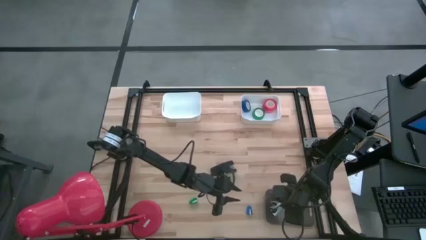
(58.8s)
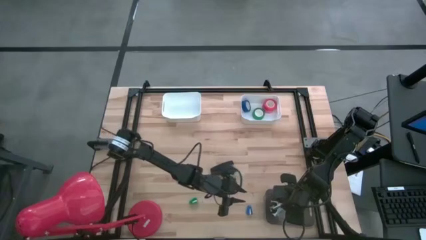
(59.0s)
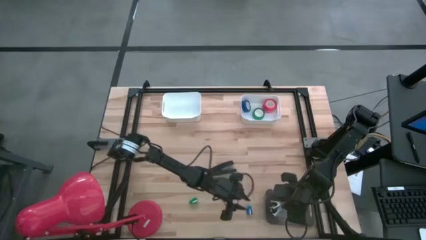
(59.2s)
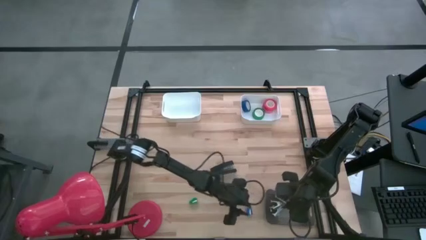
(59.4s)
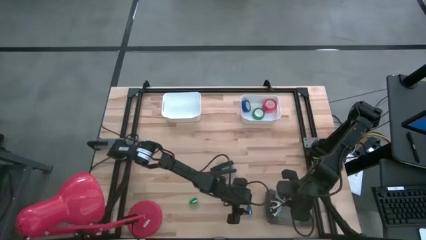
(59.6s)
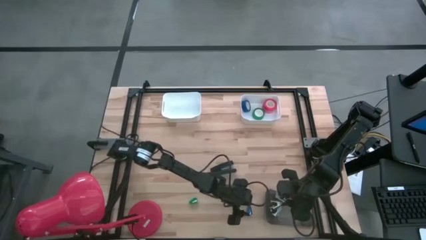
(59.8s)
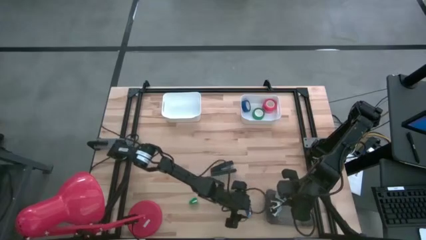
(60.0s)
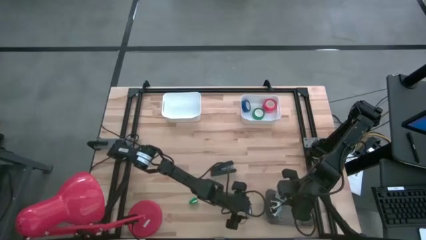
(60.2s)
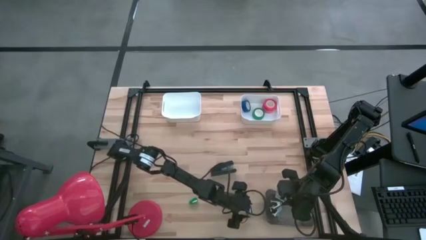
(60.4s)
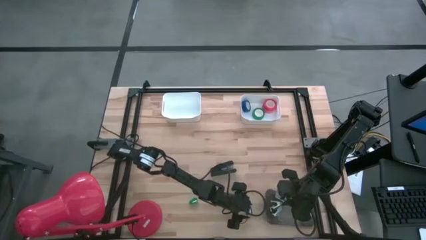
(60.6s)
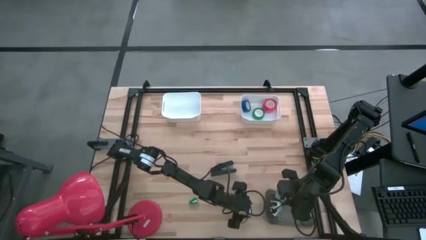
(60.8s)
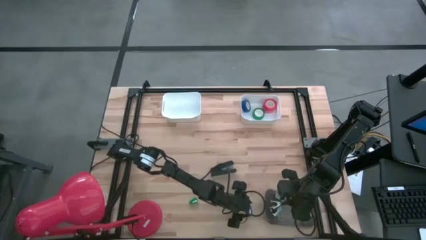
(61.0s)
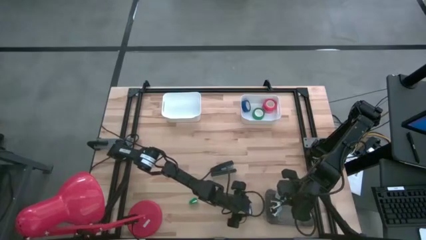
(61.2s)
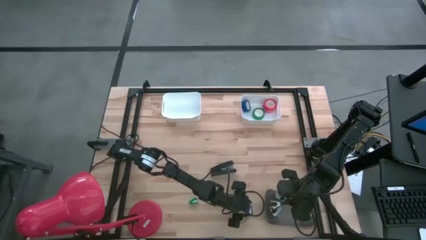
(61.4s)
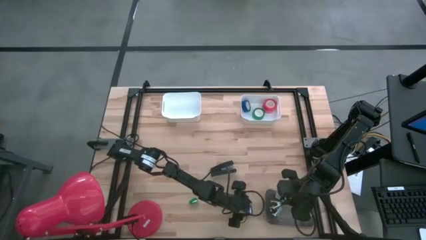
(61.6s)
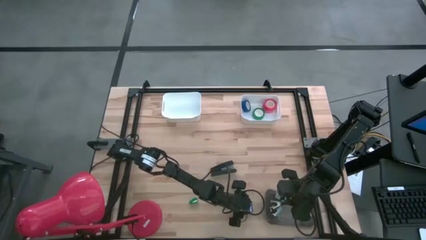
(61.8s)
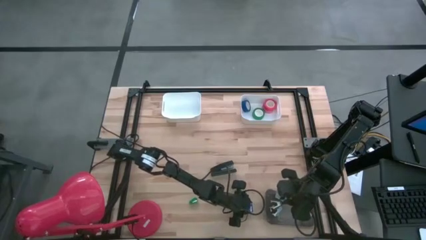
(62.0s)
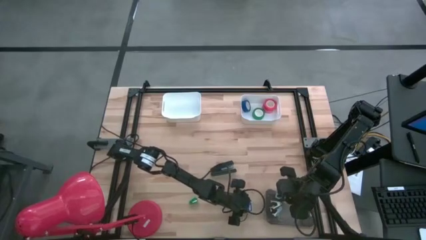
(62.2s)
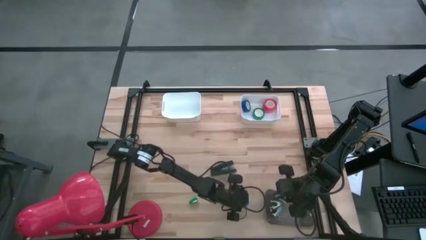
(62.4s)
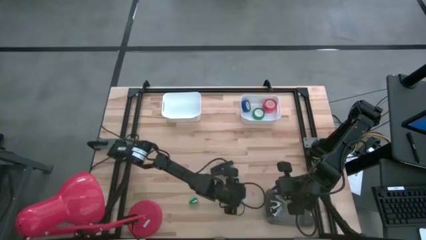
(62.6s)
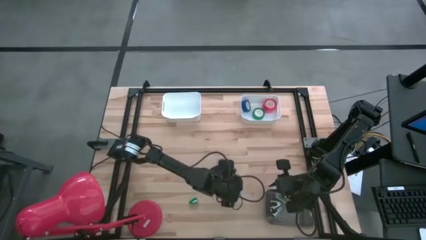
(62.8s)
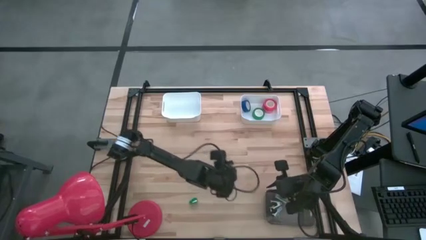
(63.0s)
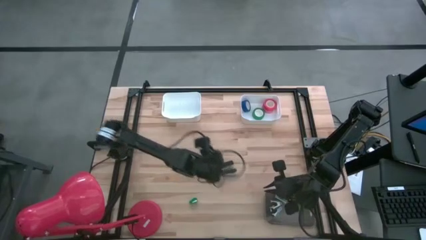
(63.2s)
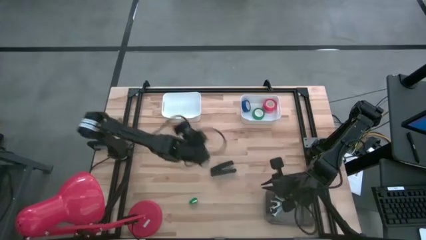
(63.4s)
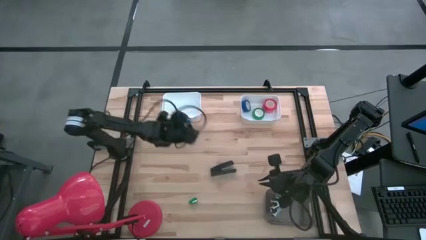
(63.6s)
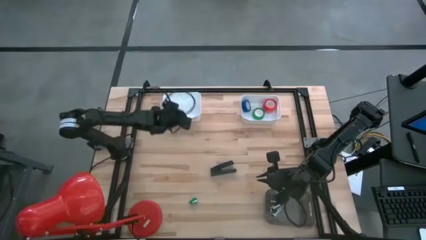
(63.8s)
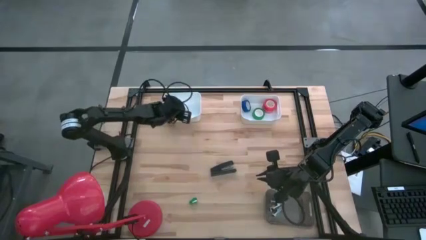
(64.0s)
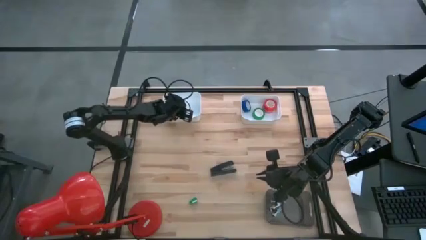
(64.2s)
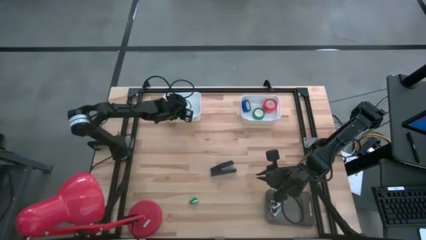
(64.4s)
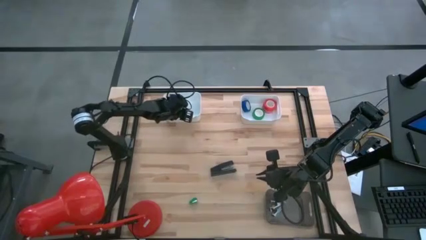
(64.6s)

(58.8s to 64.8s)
Task: Pick and place Stapler, Stapler remover, tape
Put the blue stapler into the left white bin

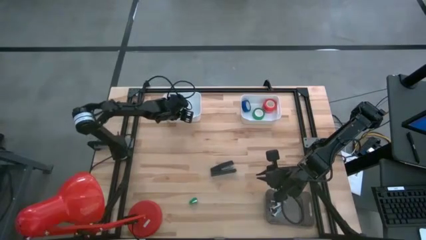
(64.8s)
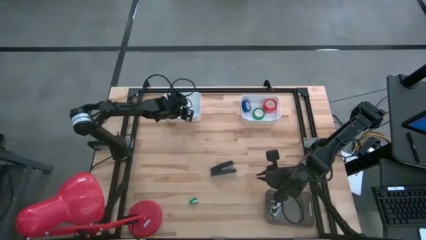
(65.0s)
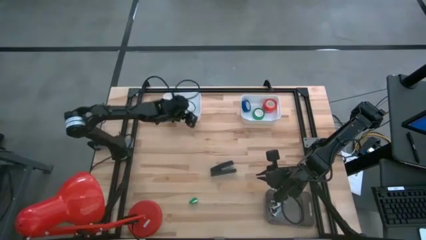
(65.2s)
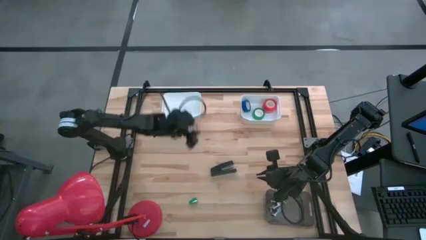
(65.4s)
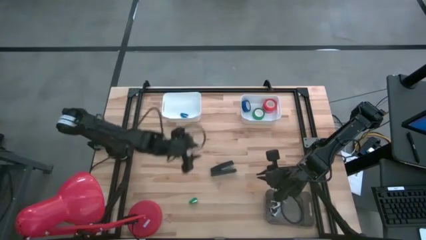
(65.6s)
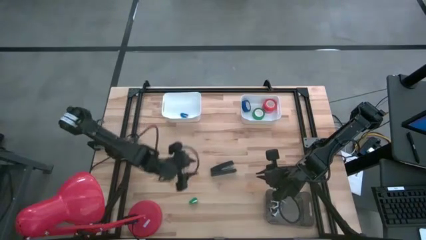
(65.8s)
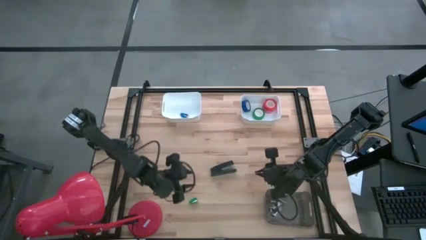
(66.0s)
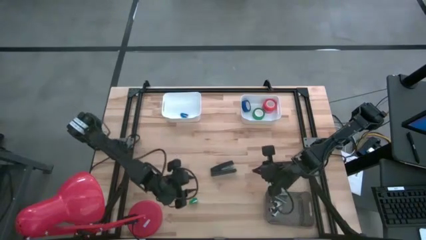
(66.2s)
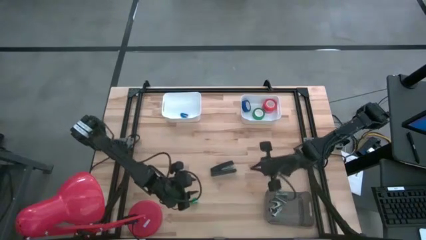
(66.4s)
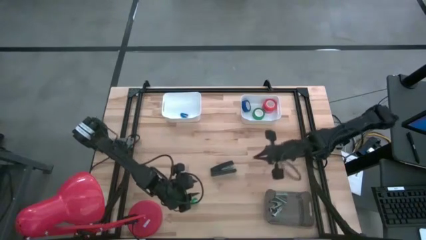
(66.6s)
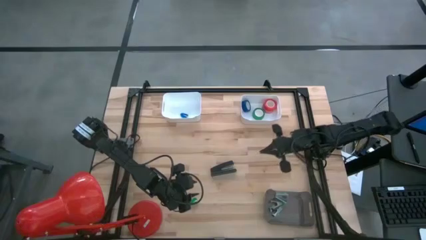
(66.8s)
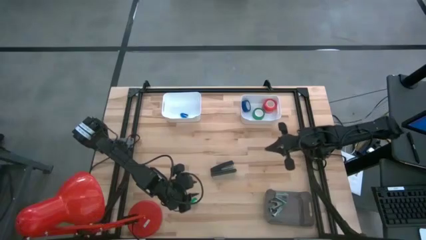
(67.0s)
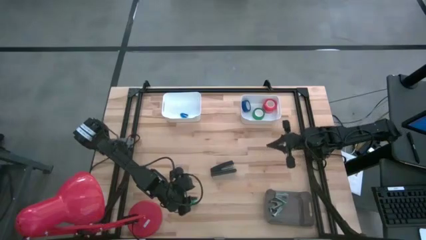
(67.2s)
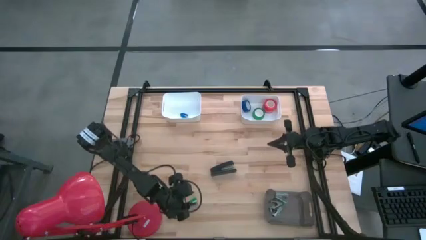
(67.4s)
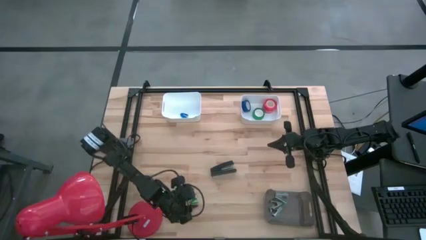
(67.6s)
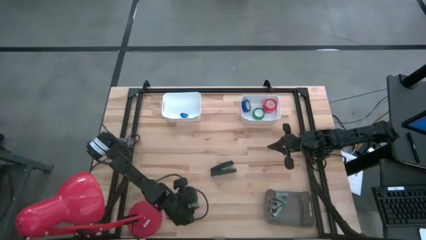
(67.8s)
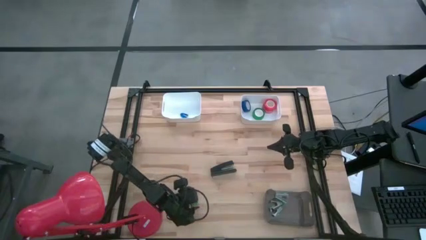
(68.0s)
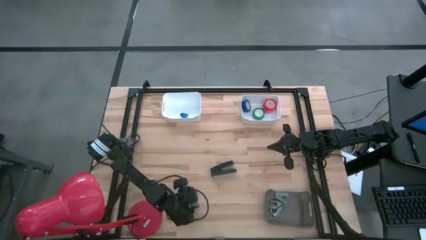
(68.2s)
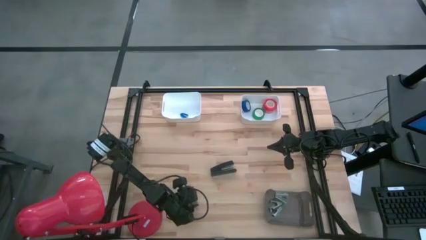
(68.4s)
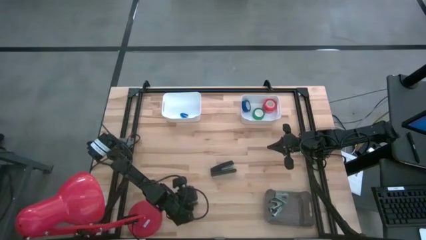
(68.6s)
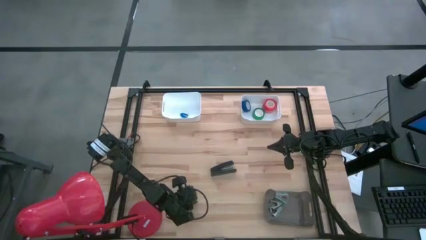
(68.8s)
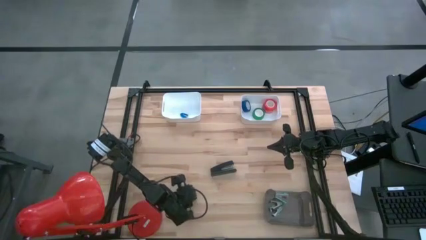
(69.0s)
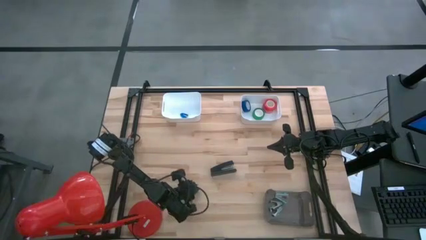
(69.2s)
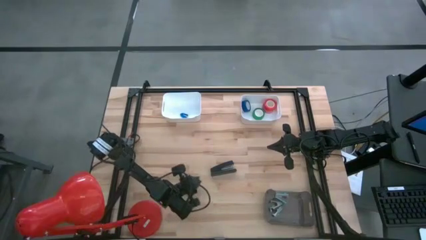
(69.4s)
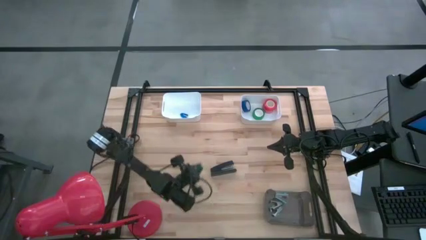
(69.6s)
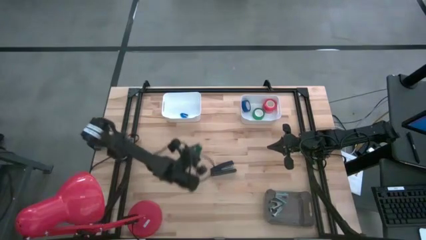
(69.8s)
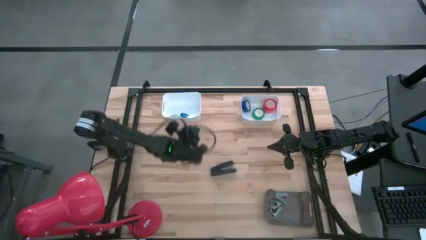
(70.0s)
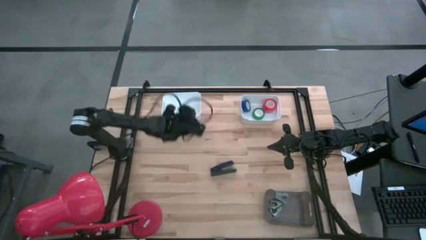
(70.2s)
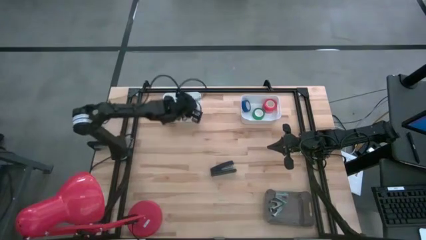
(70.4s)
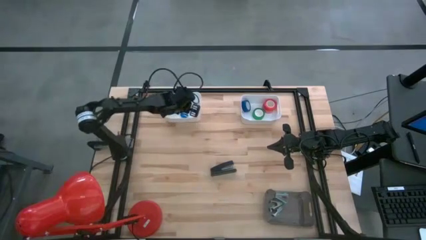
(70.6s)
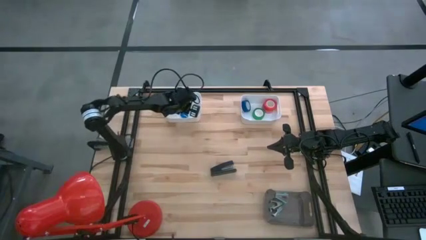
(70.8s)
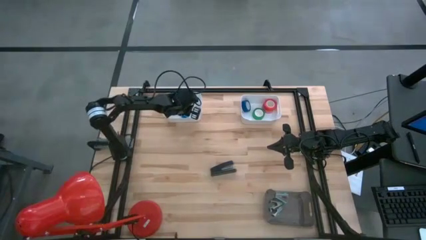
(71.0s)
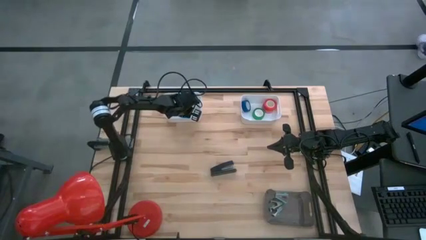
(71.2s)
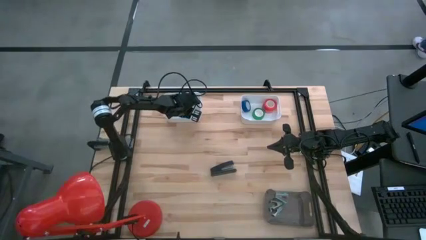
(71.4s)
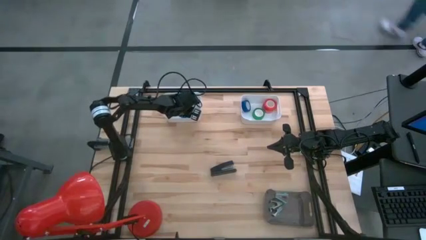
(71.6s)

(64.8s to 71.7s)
Put the green stapler into the left white bin

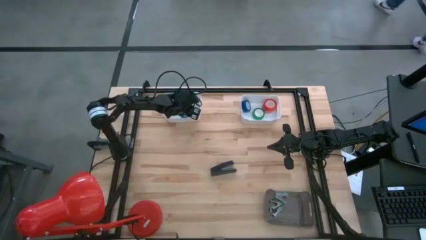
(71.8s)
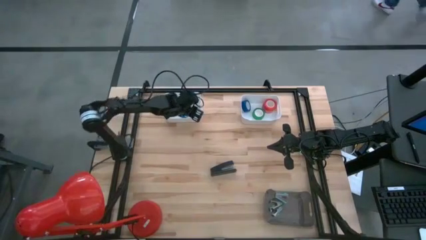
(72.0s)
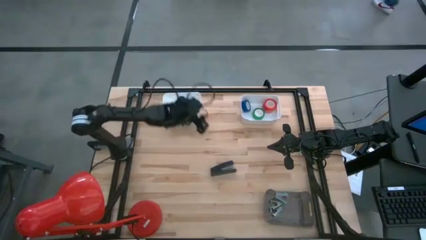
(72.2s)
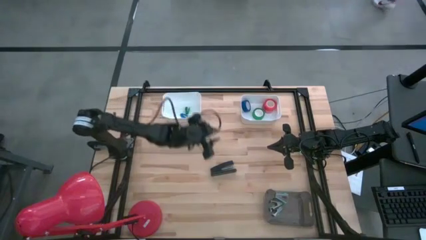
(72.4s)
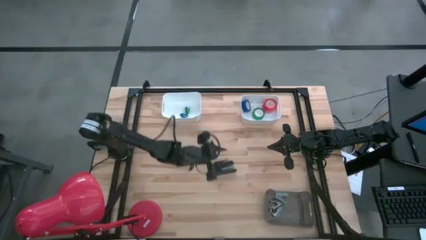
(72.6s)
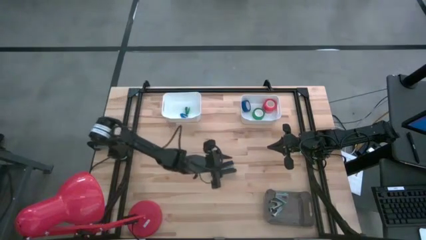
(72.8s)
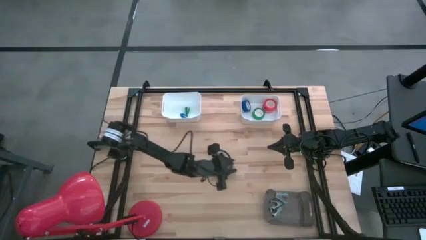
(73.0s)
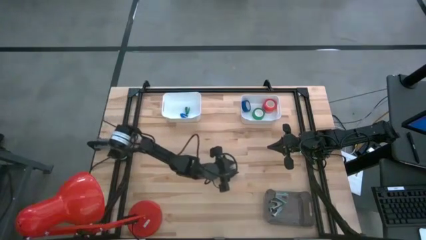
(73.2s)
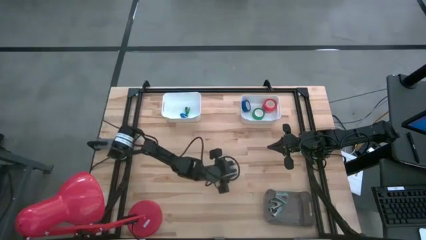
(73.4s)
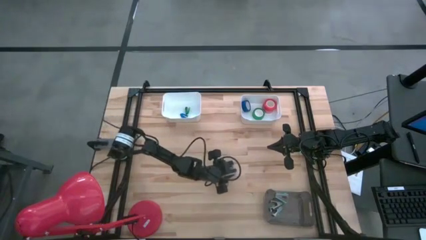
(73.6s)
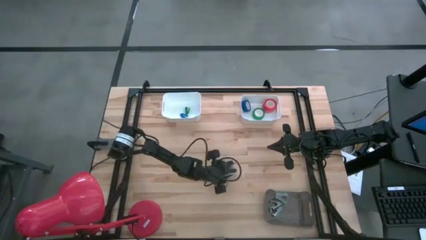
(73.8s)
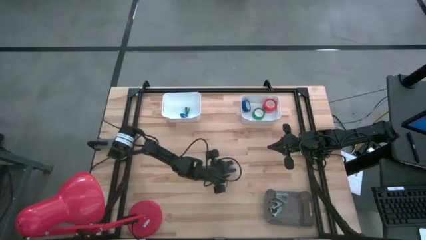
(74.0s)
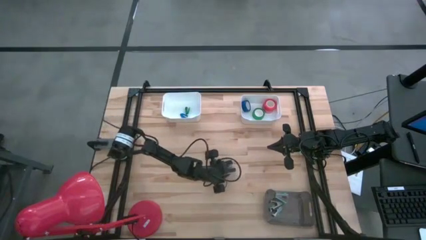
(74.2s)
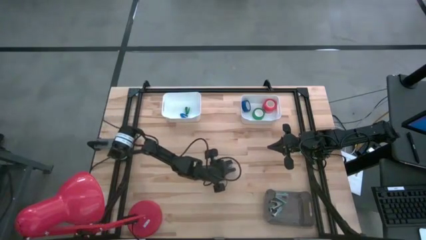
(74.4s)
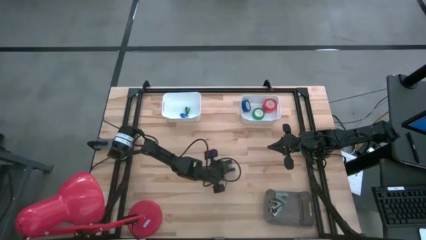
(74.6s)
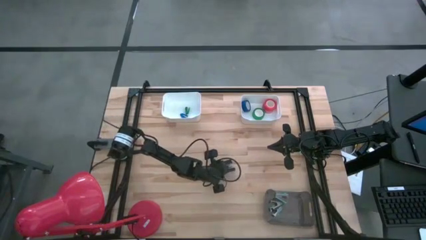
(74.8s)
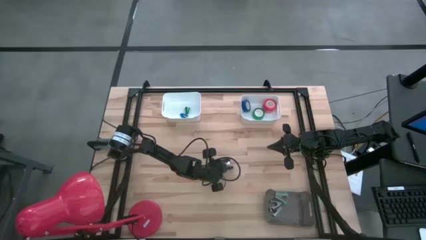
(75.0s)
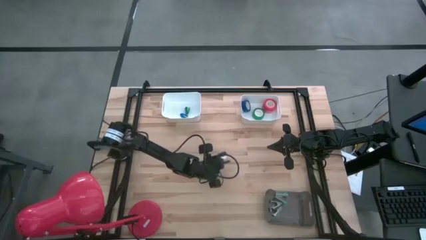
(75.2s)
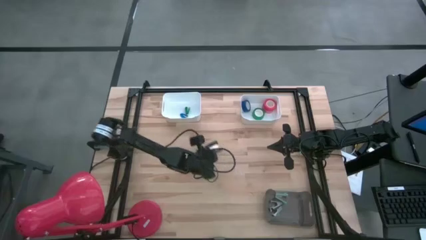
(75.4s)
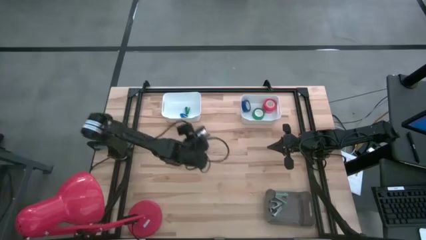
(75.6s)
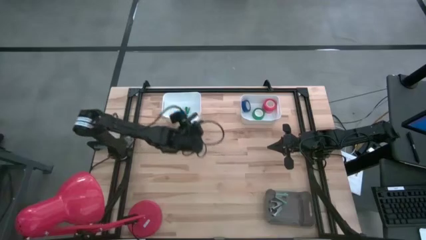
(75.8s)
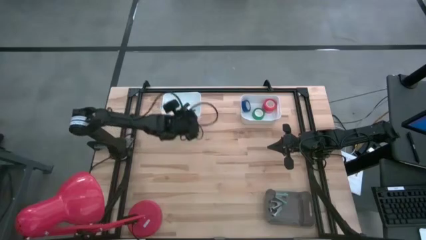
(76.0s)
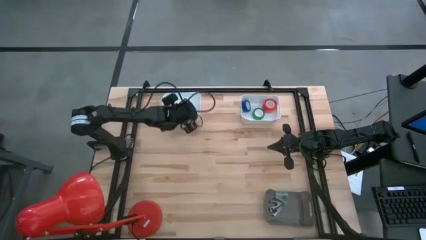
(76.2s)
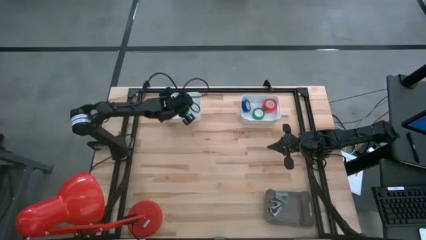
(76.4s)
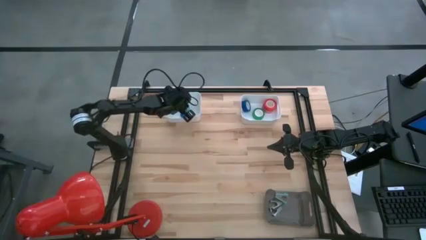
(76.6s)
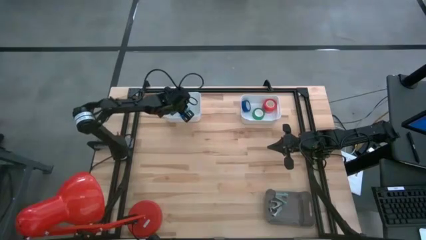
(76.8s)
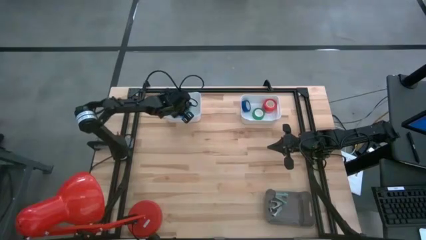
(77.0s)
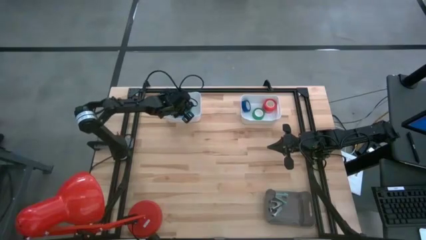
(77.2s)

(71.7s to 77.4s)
Put the black stapler into the left white bin
